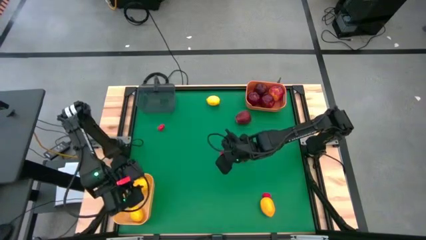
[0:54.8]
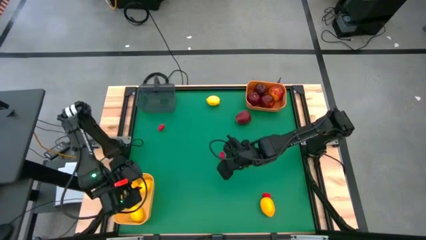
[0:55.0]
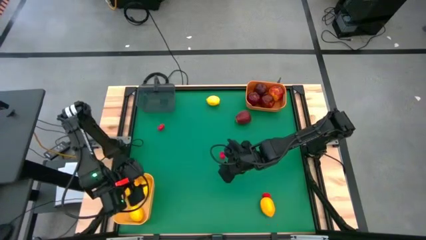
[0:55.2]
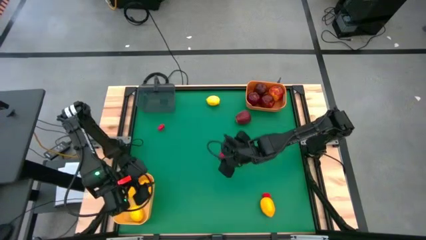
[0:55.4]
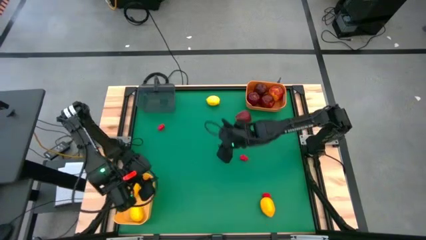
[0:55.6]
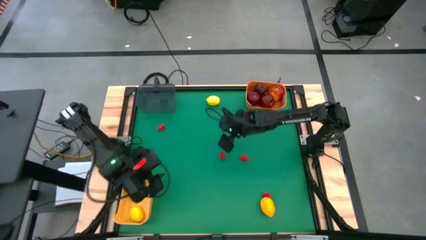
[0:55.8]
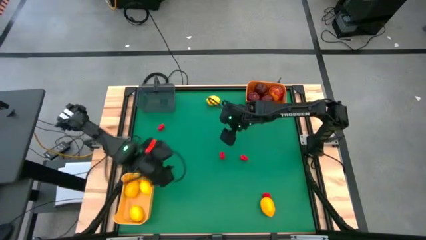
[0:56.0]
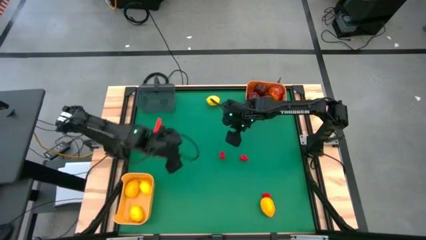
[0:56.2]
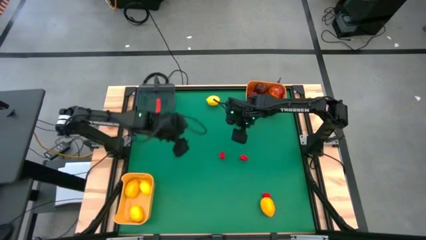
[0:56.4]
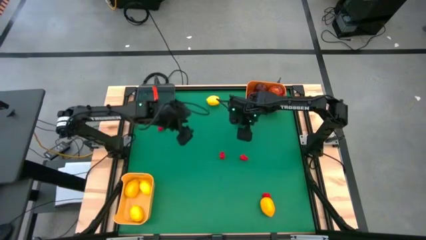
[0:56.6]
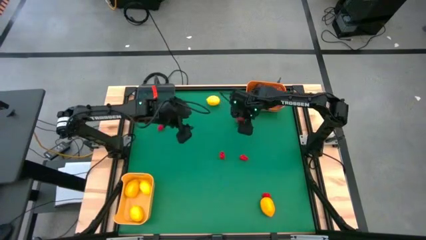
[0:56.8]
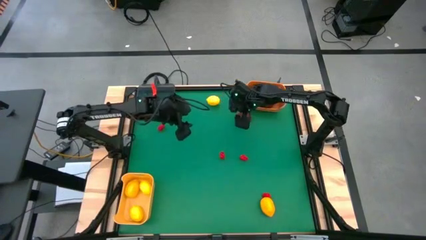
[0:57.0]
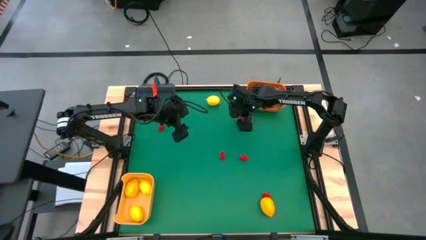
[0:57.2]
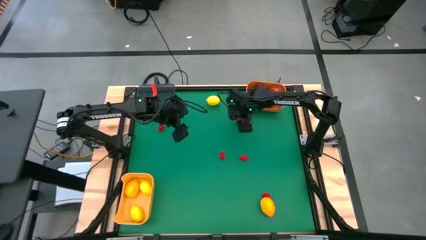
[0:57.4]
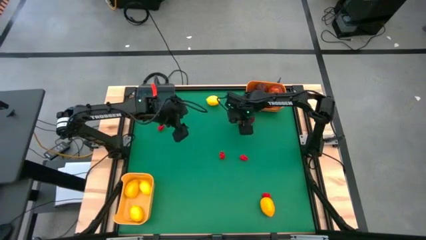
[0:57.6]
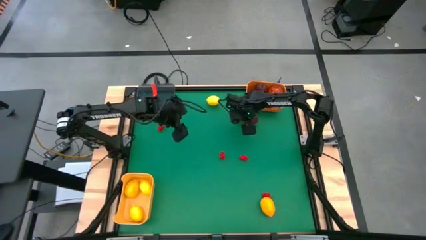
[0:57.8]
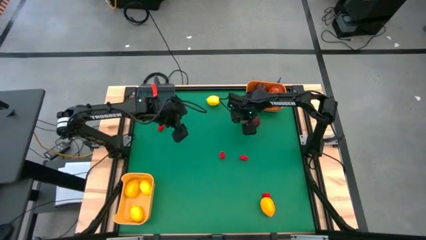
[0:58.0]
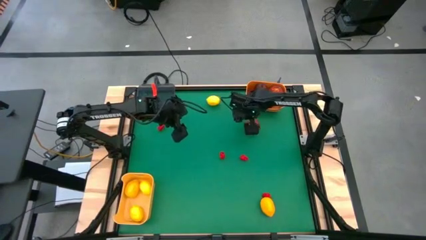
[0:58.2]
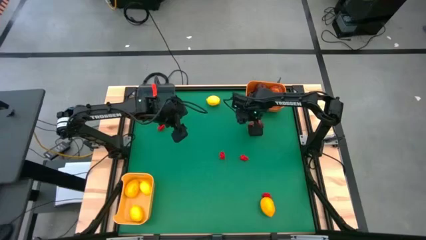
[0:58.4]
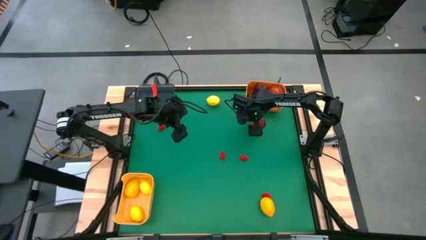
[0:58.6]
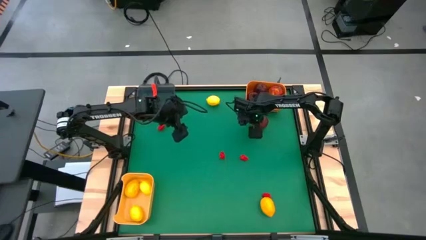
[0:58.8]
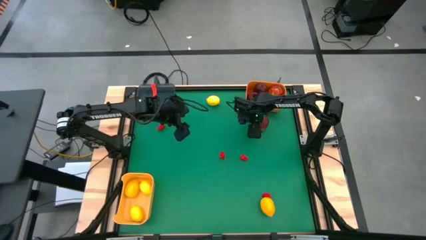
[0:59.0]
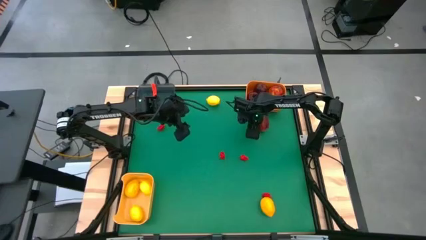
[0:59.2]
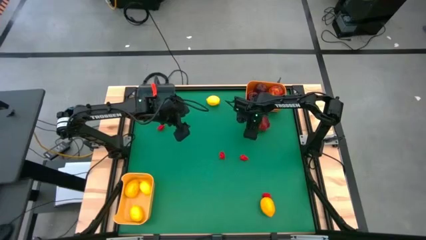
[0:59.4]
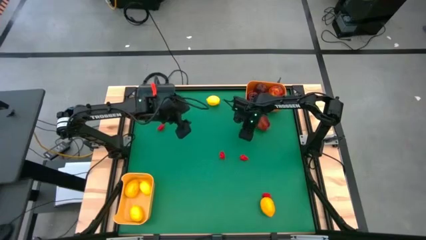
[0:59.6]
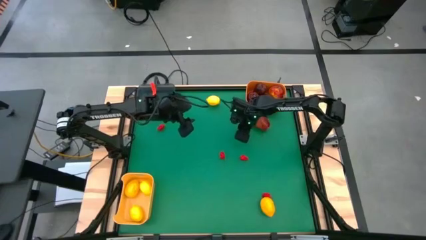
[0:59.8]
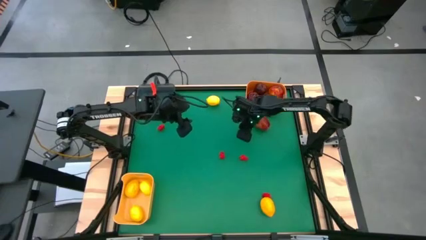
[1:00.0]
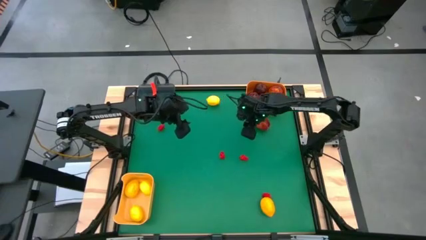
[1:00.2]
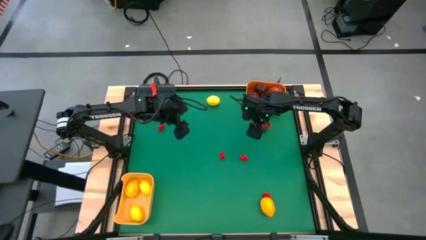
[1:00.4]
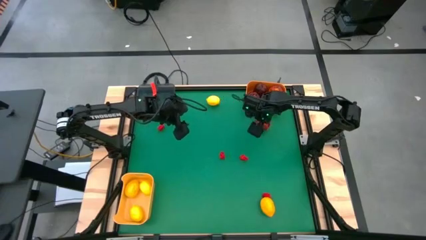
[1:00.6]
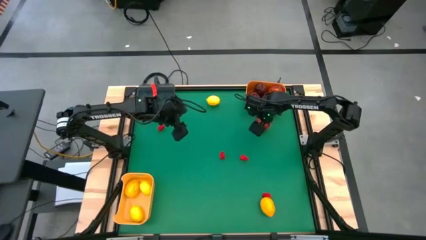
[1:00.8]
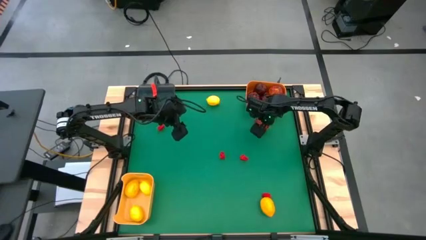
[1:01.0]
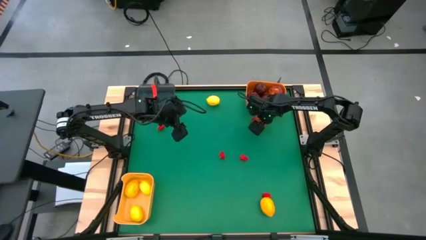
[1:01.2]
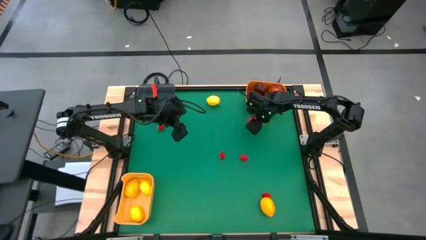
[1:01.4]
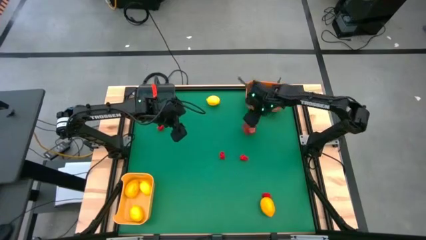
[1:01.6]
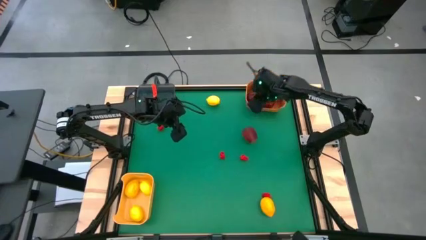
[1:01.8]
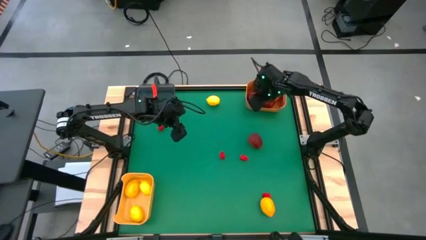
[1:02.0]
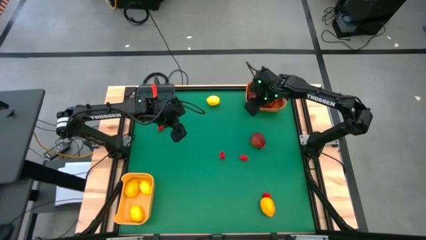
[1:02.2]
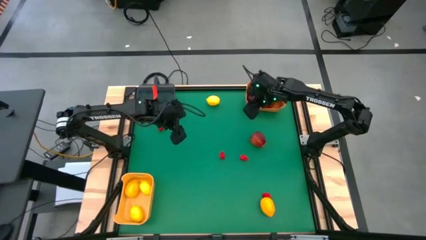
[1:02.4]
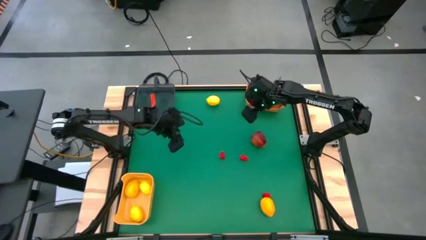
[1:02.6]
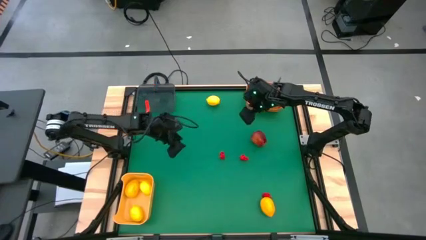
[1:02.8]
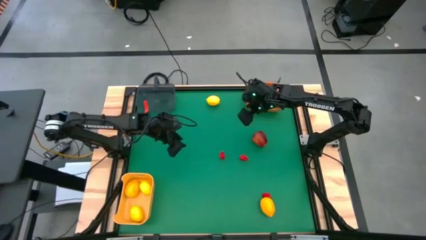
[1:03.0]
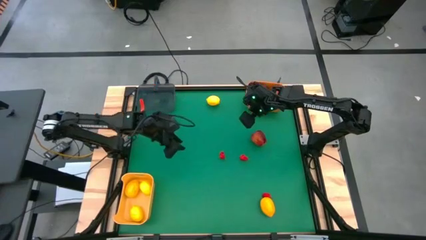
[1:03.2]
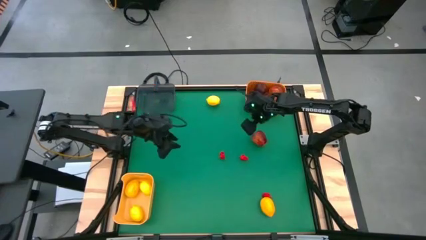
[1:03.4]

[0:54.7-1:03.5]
Task: Sort produce into baskets
Put the apple into the orange bin

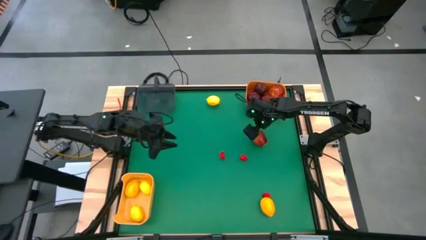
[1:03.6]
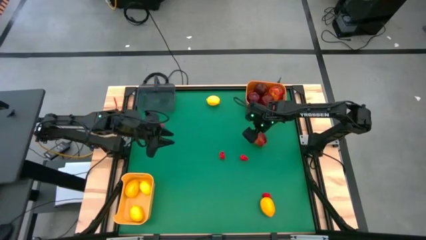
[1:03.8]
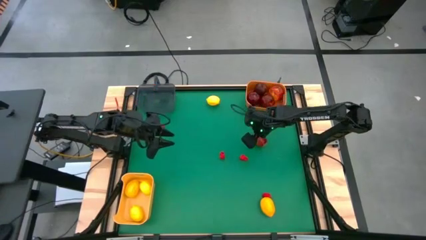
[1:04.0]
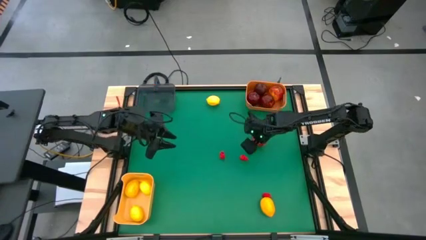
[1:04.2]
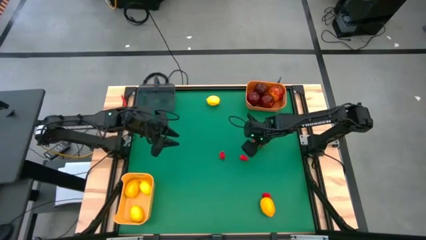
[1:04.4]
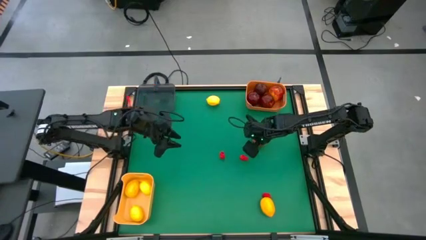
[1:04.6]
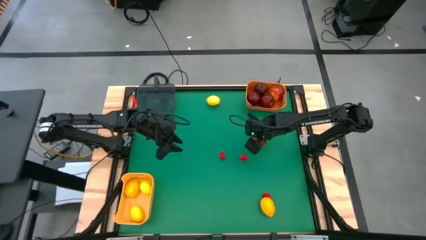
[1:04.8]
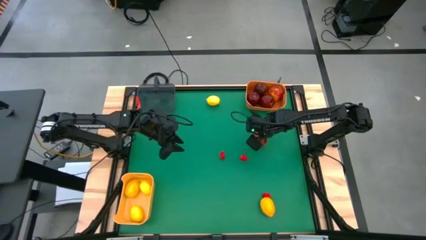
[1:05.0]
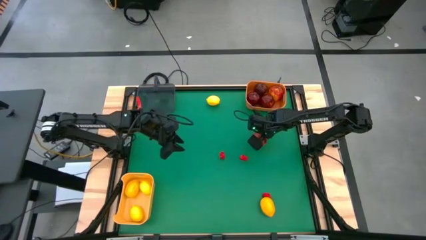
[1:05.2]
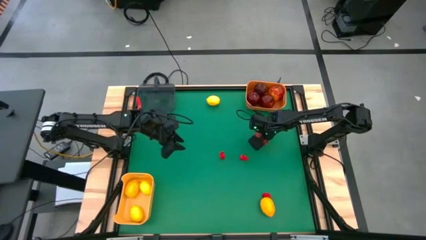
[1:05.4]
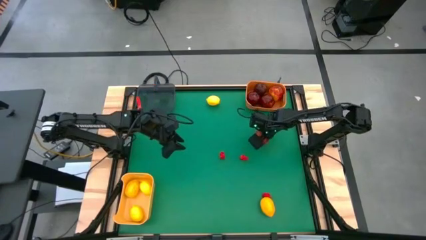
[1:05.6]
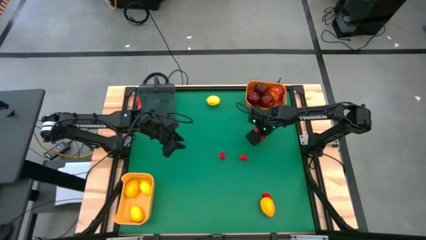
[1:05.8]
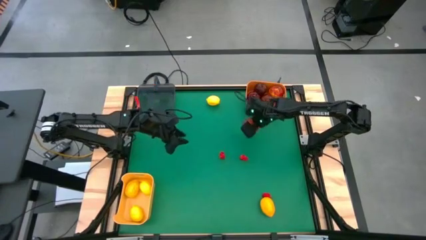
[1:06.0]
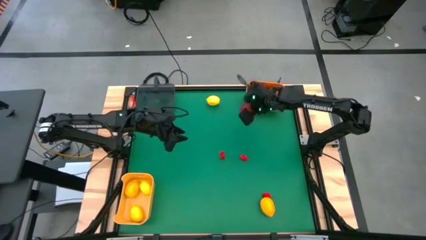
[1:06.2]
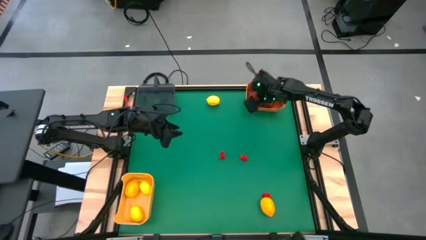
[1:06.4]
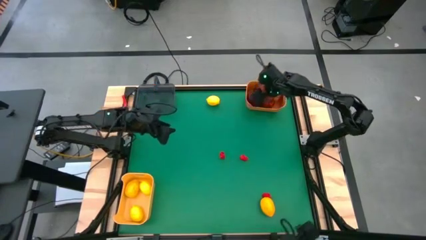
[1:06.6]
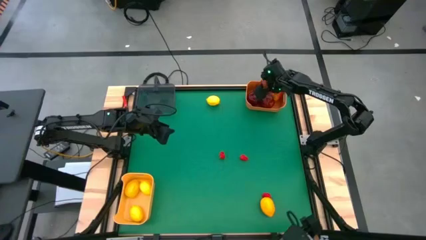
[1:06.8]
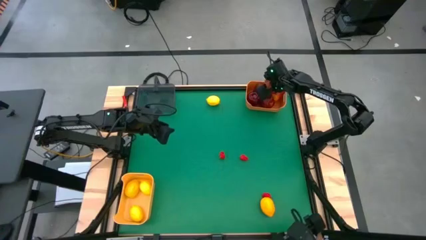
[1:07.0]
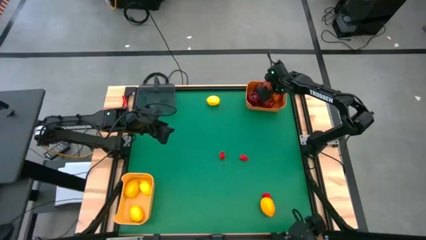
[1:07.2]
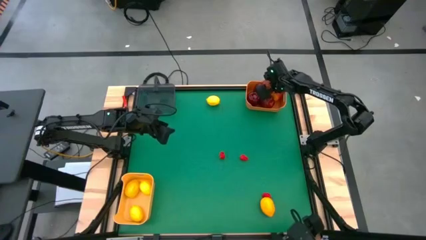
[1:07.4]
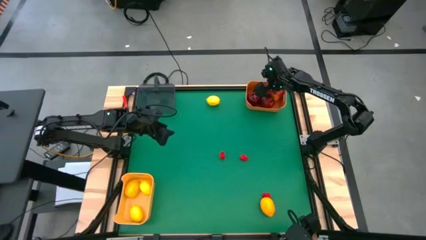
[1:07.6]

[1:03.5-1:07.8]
Put the apple into the orange bin

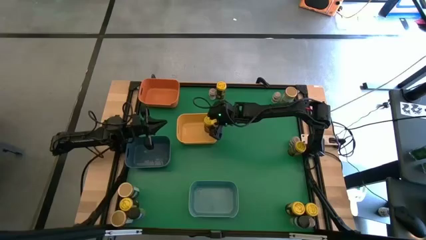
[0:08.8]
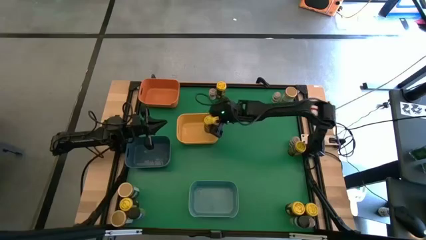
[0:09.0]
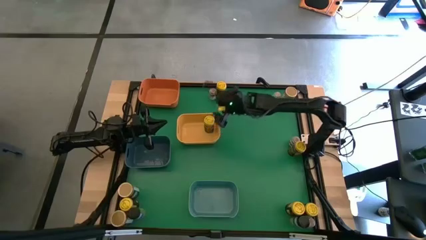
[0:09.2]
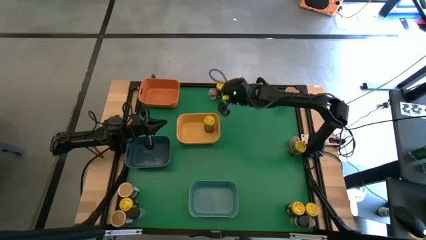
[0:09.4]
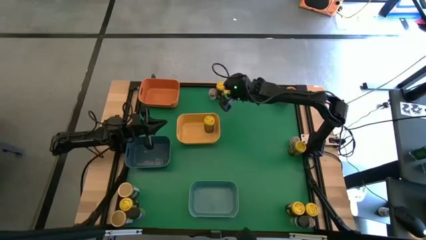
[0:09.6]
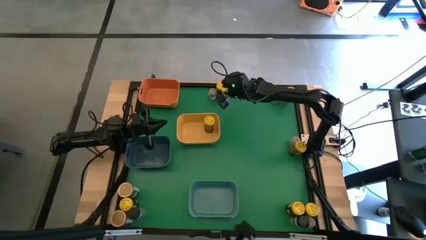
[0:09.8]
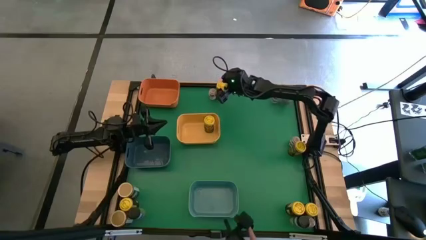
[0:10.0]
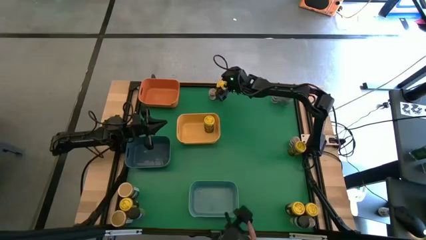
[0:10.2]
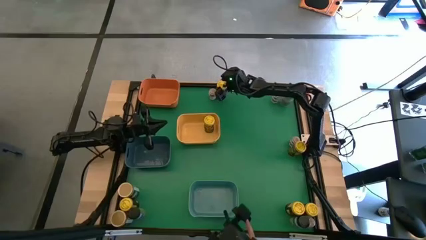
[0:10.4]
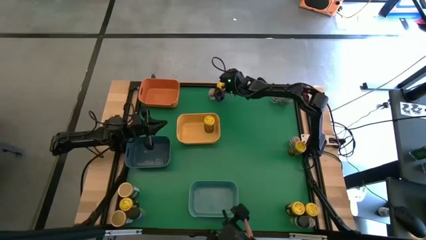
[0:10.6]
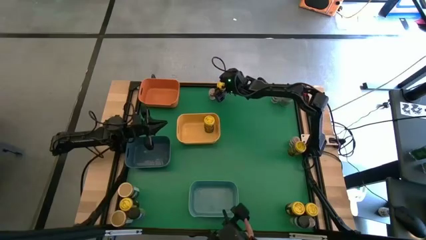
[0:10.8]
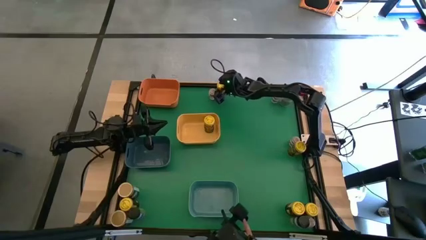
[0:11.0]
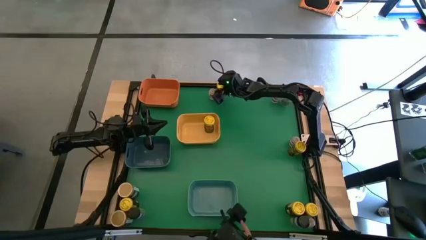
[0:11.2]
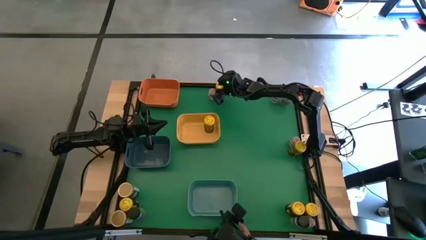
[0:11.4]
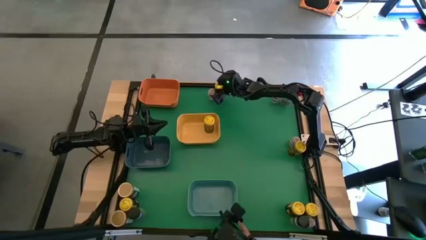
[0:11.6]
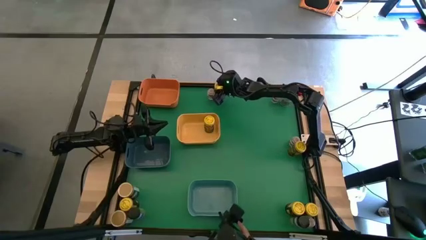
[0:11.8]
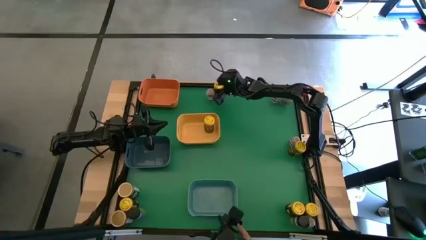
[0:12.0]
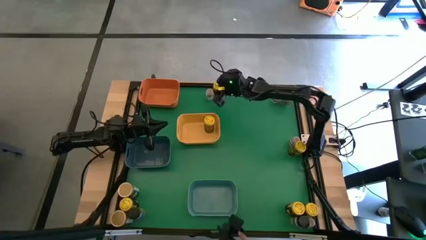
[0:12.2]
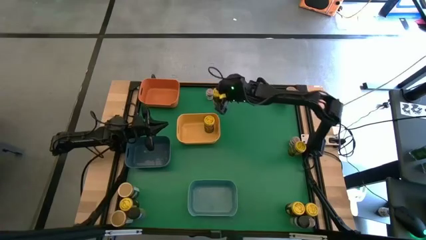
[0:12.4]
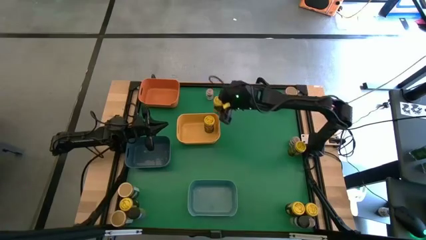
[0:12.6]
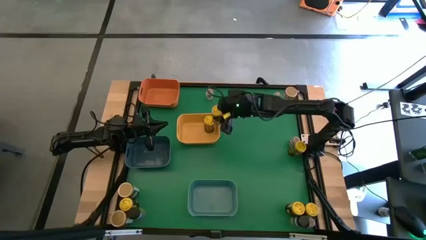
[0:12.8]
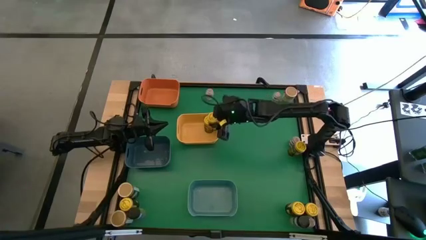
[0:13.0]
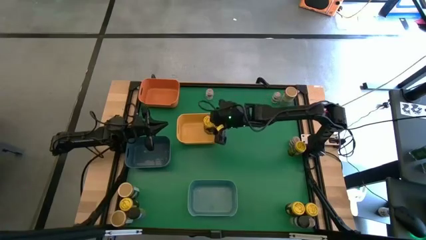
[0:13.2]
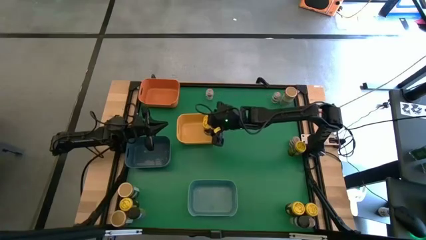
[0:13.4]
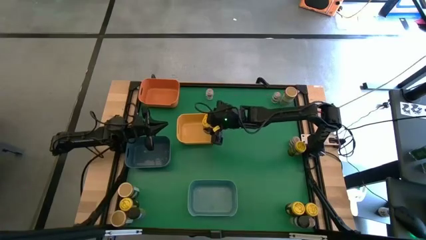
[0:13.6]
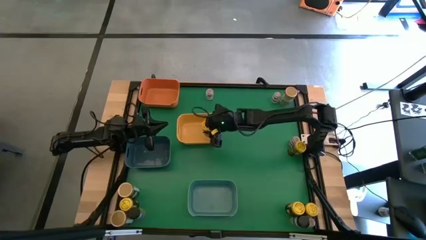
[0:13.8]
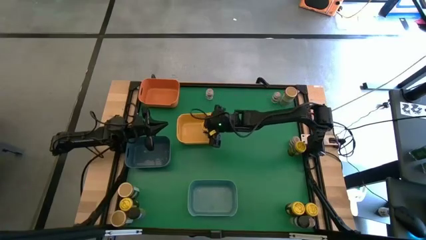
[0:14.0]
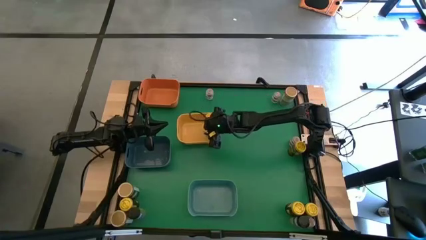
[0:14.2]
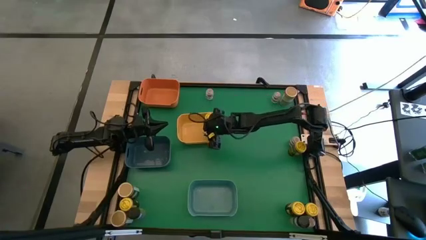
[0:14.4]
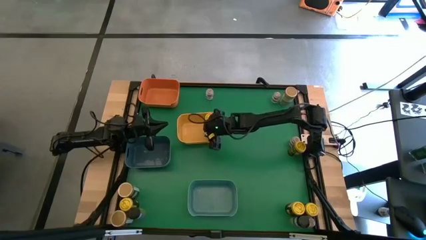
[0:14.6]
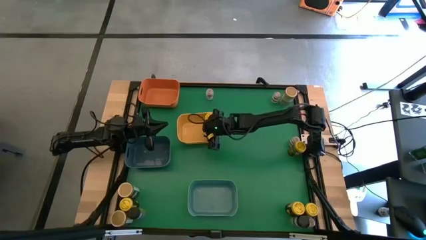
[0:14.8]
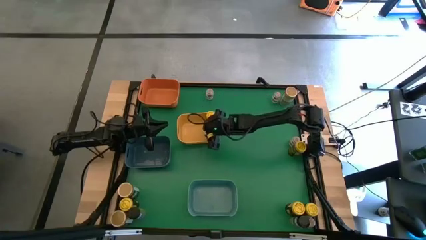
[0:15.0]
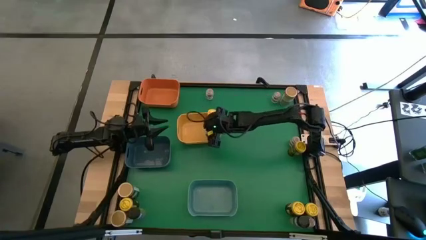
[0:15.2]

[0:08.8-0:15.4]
Task: Sort spices by type
Put the yellow seasoning bottle into the yellow bin
